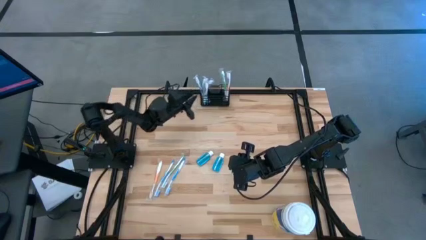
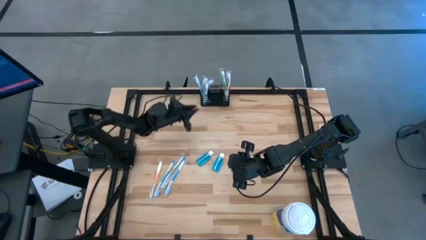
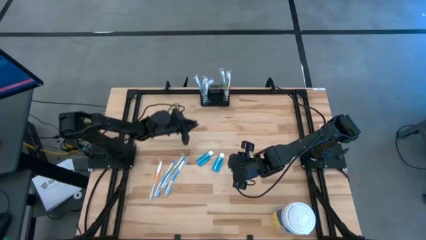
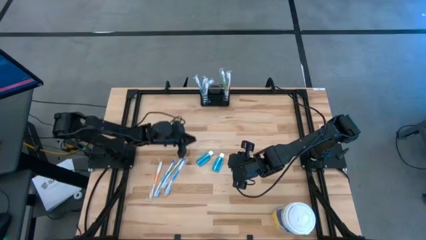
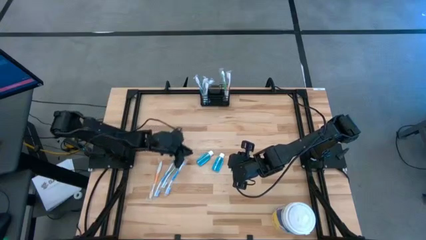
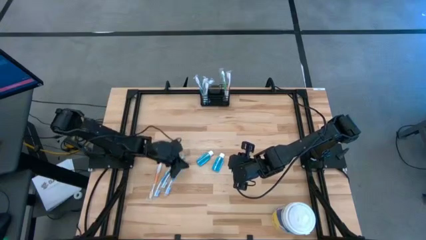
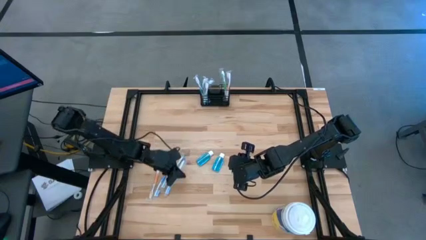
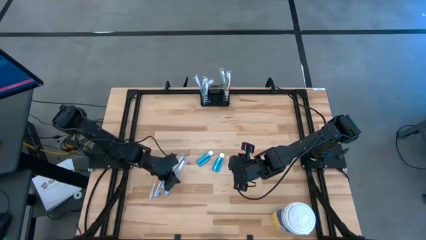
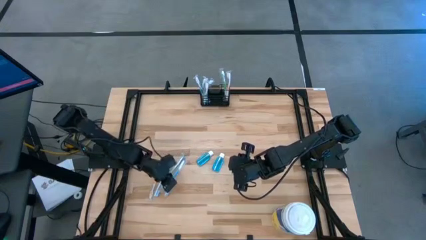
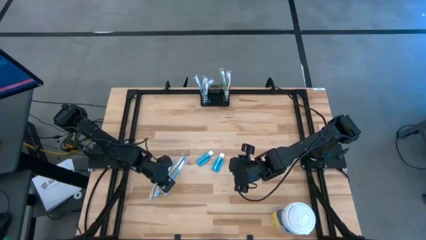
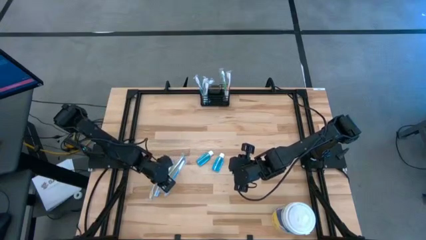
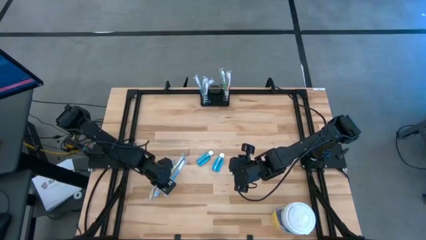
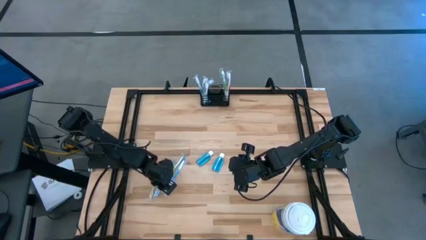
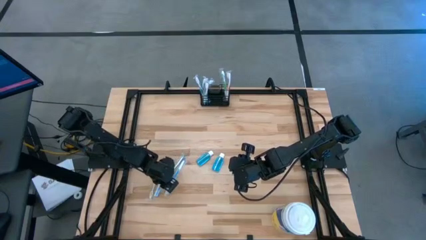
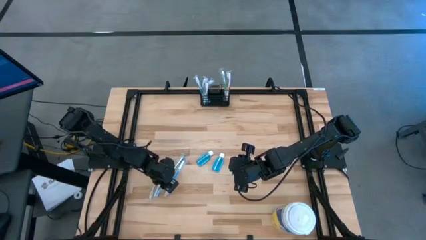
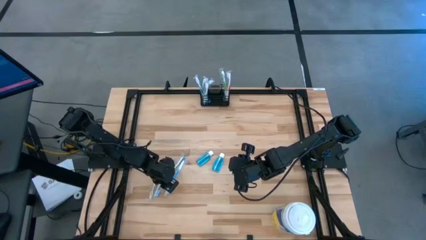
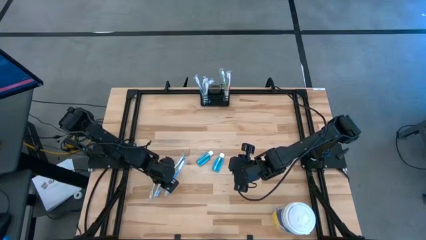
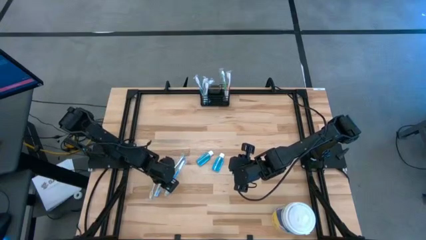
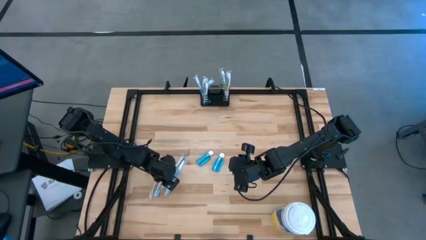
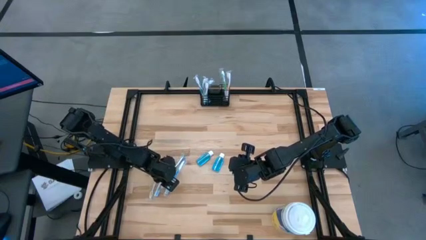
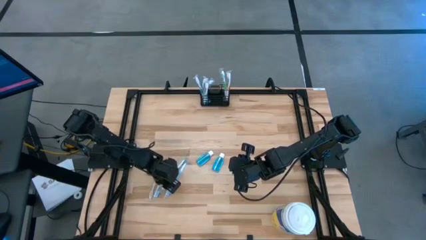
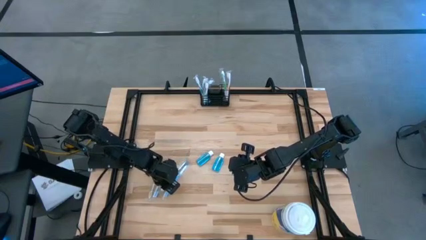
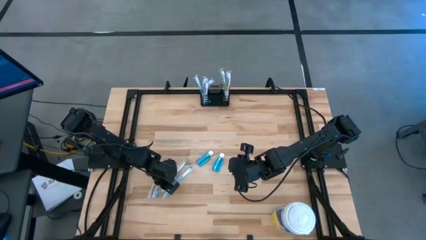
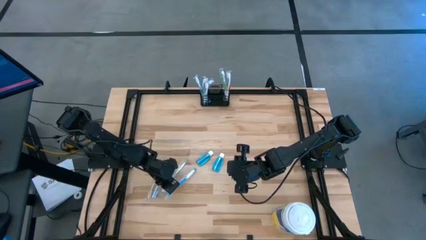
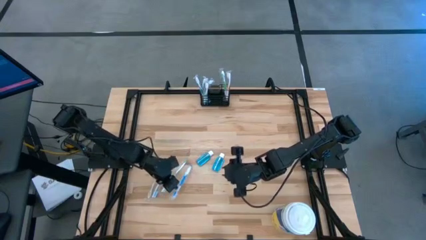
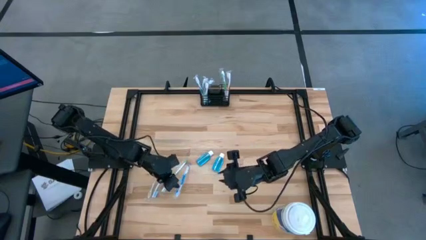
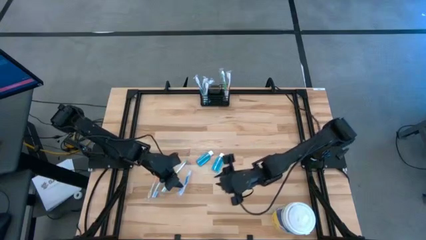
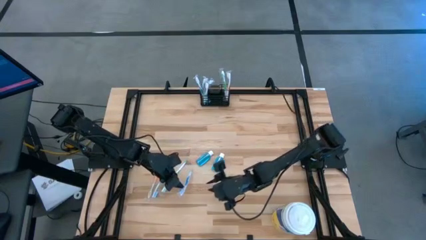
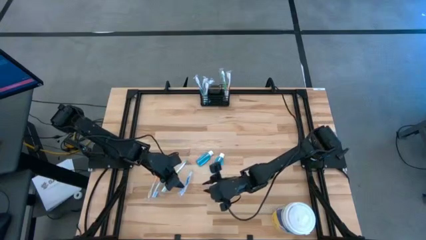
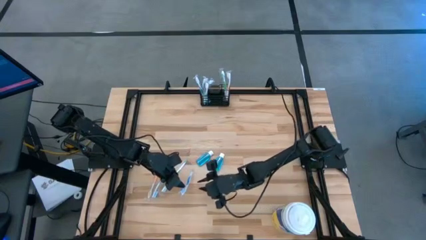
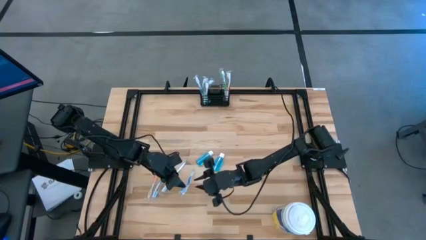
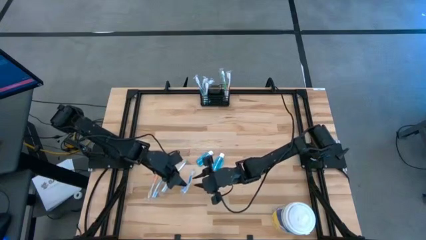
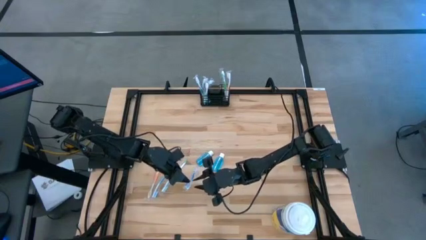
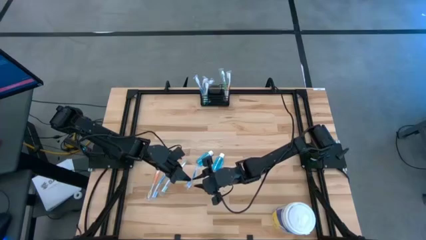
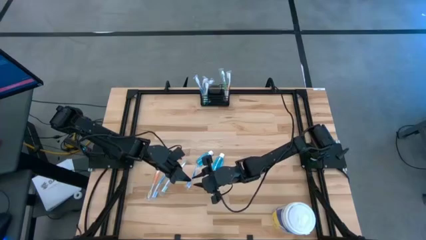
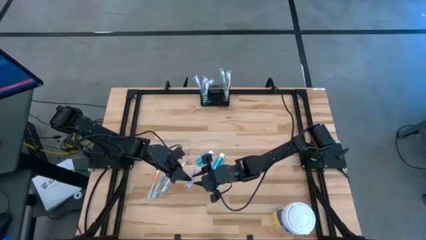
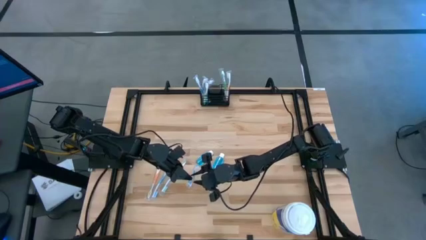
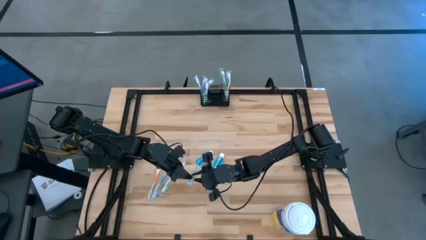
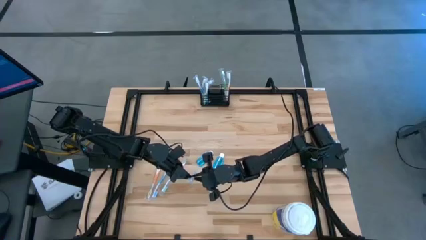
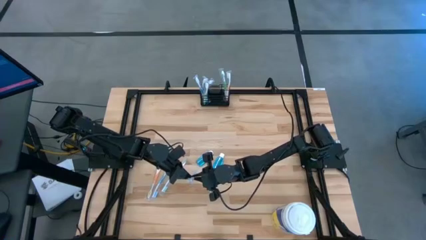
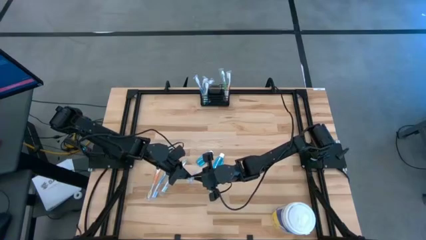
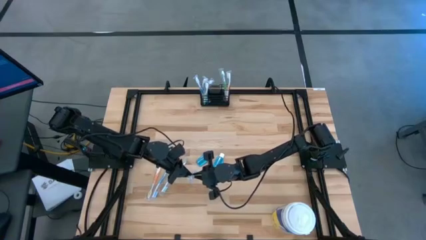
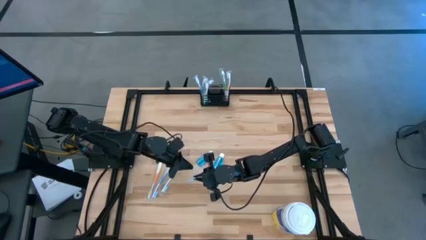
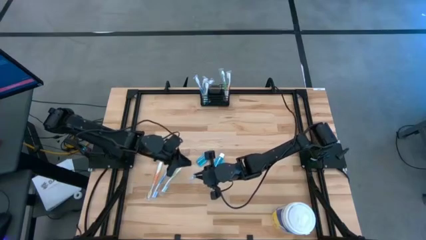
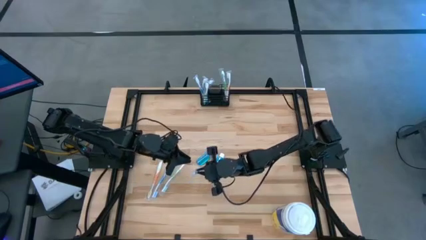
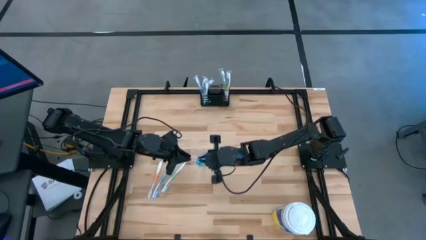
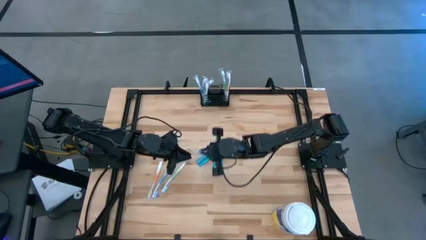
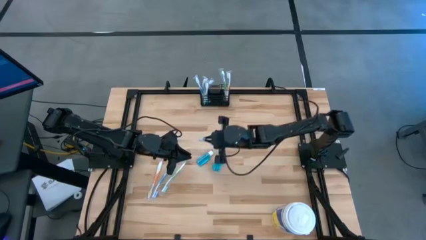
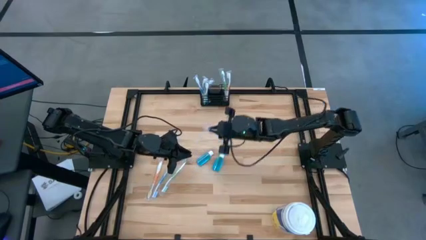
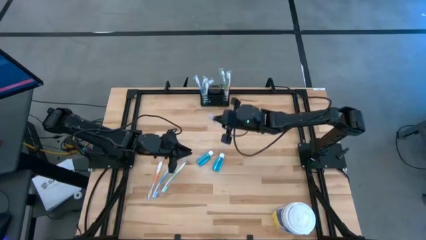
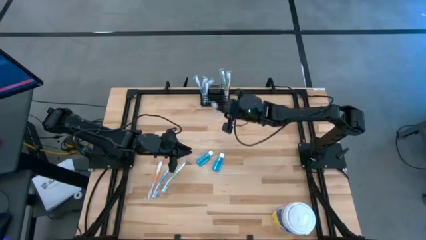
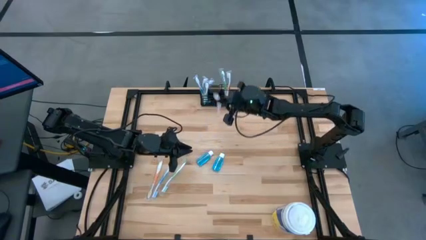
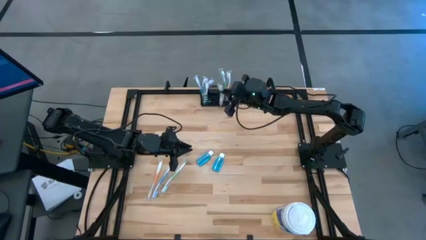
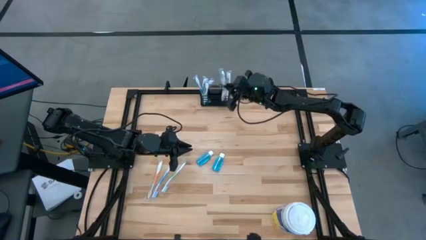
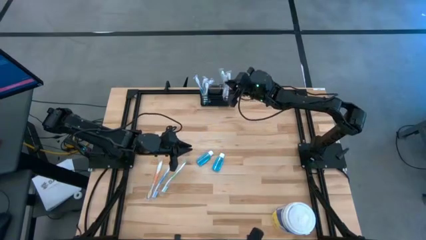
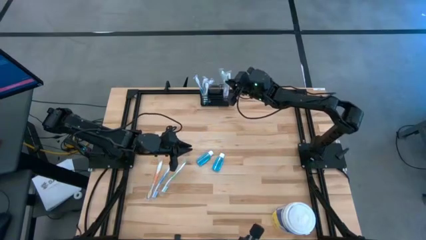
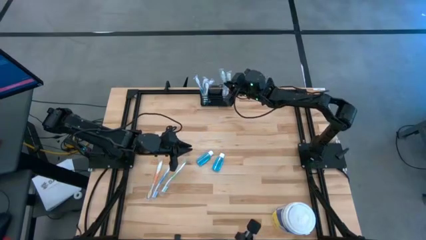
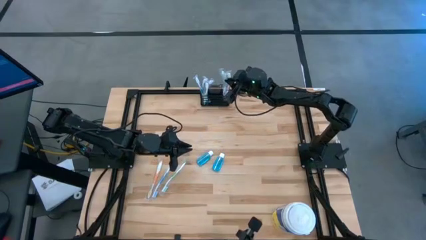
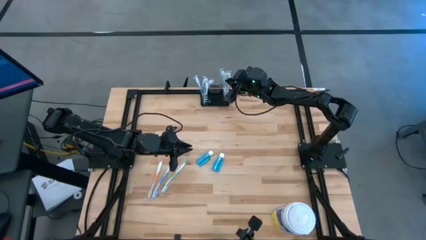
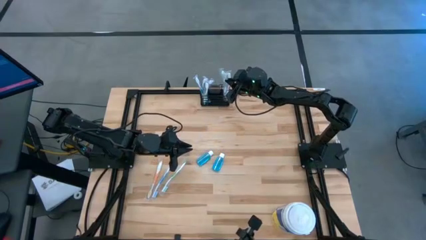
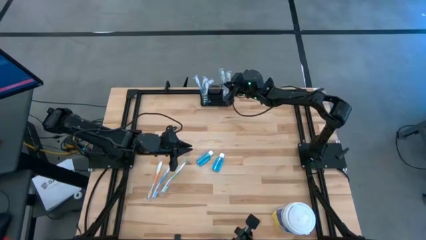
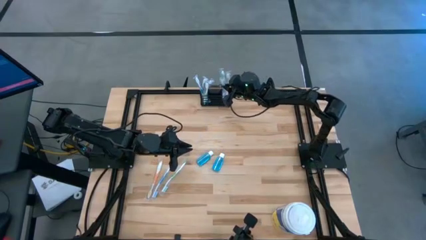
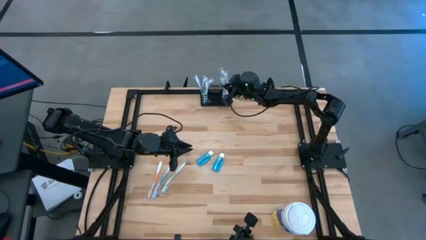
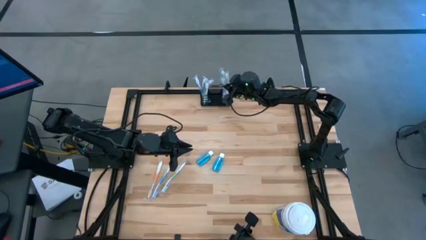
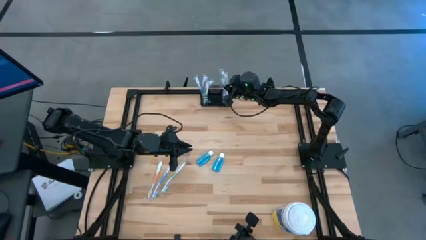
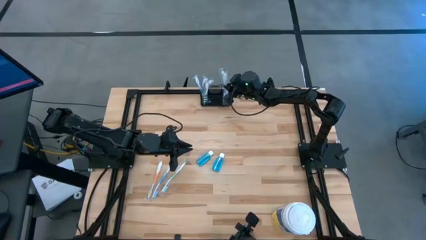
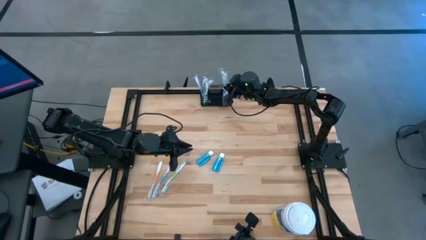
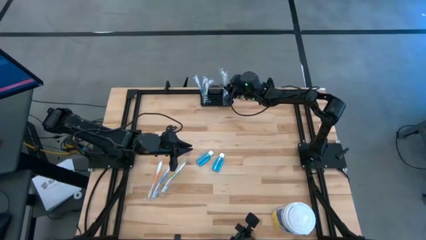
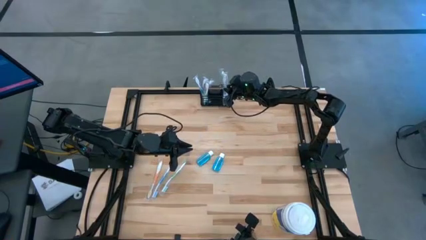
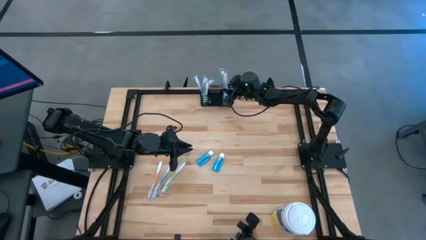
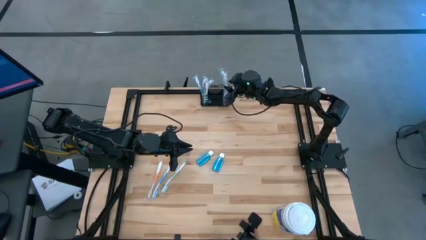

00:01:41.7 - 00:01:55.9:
Task: Pick & Place toothbrushing station
Put the right blue toothbrush into the black wire organizer

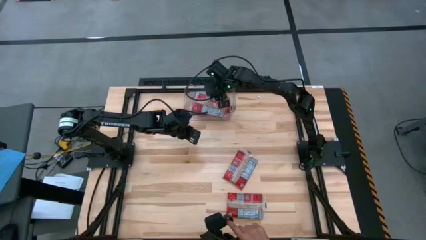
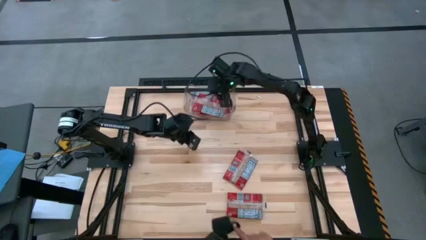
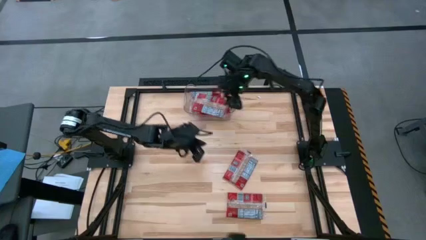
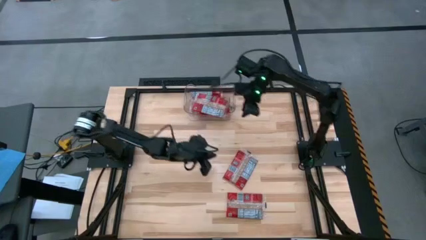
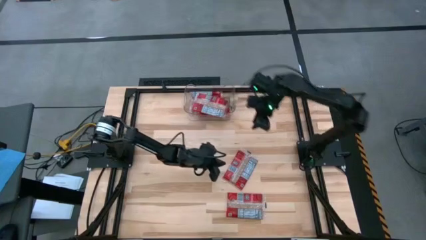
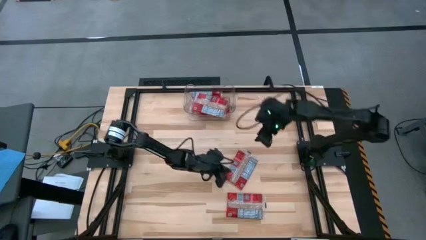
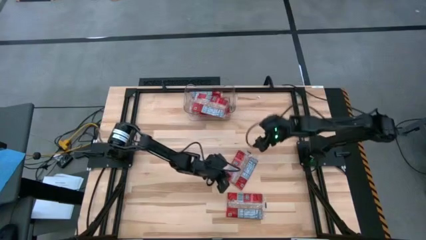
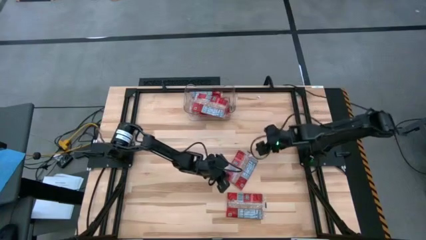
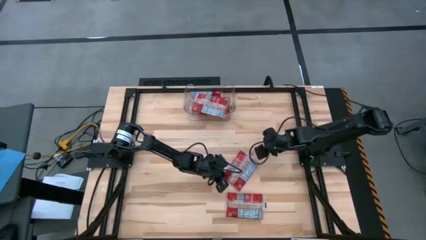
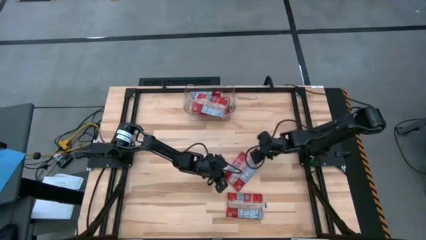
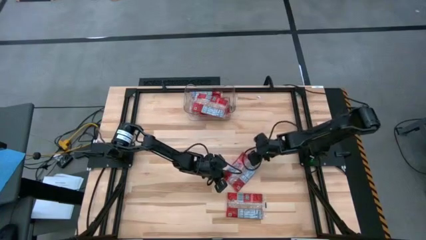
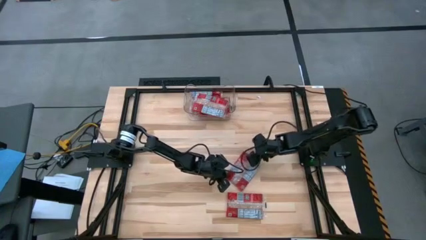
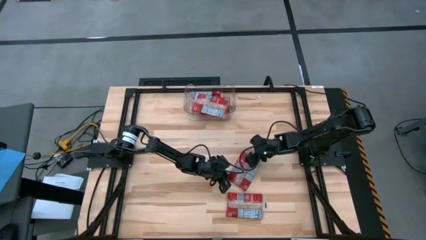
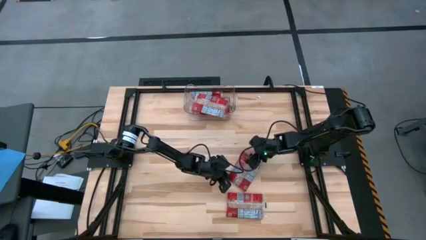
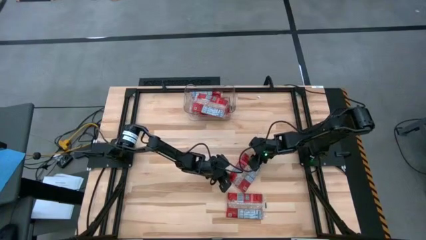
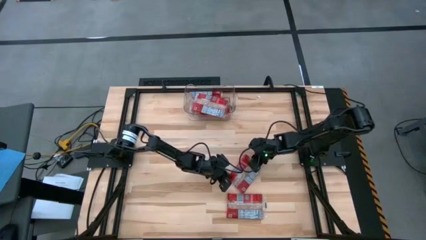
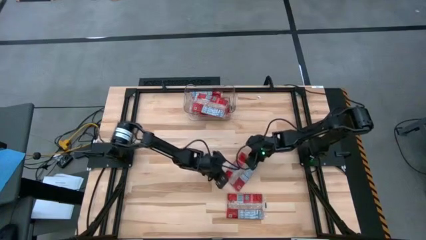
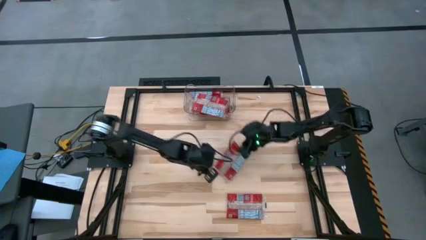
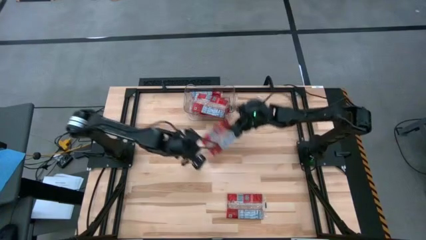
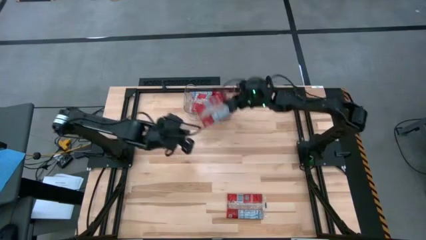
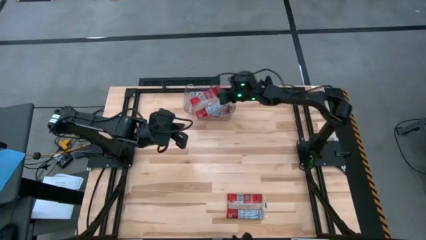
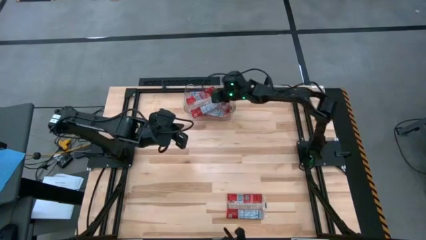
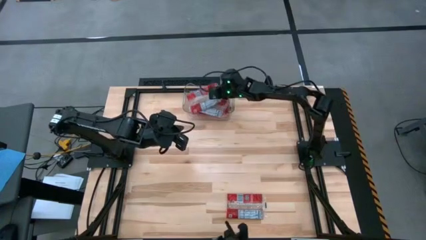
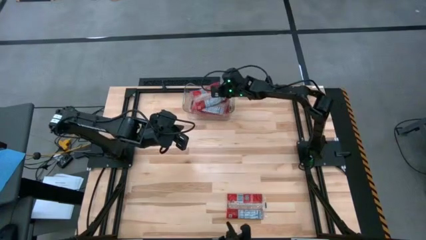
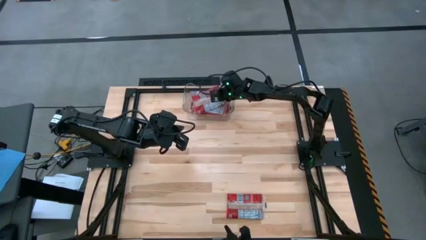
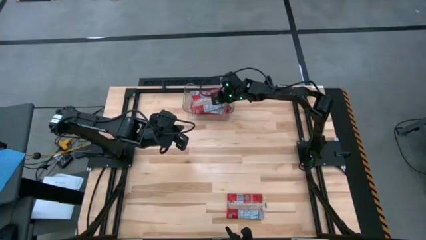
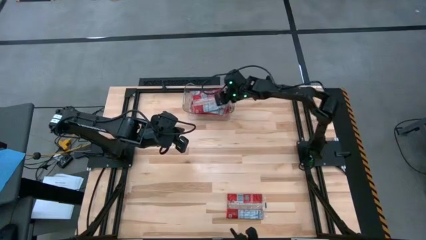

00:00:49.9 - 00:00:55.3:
Task: Sort popcorn bags into baskets
Put the red popcorn pack into the transparent bin
